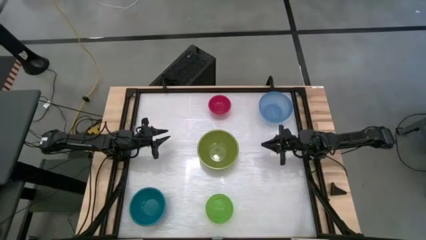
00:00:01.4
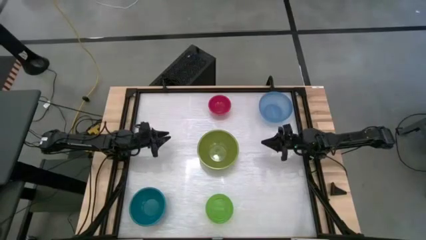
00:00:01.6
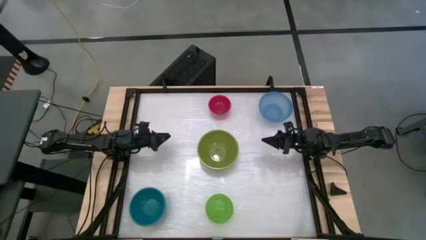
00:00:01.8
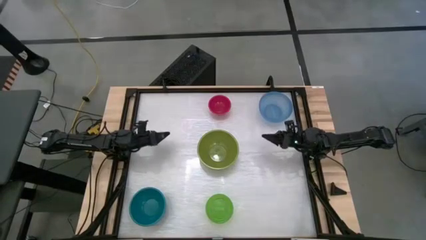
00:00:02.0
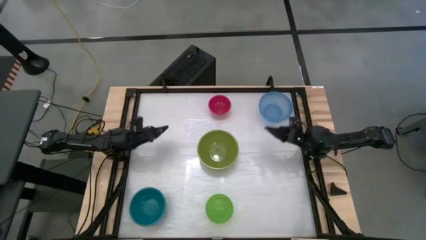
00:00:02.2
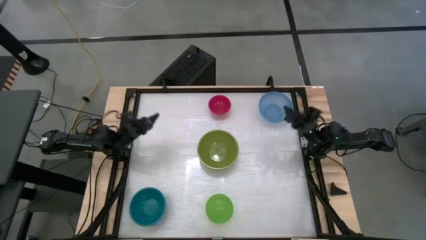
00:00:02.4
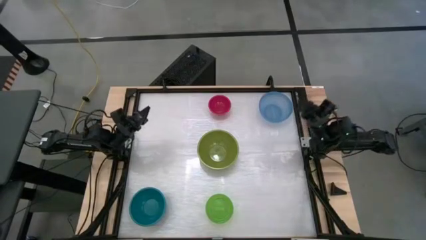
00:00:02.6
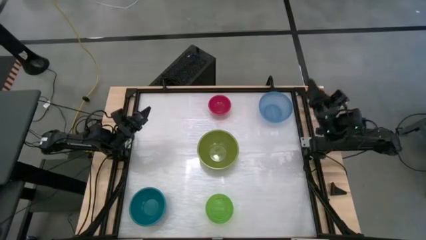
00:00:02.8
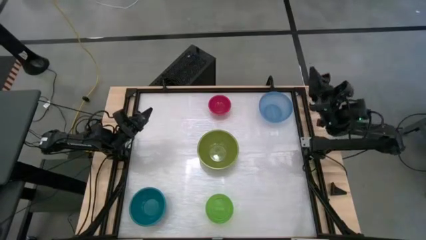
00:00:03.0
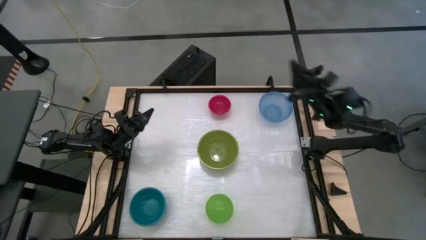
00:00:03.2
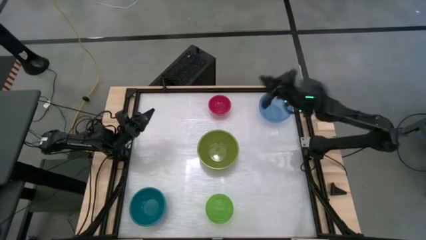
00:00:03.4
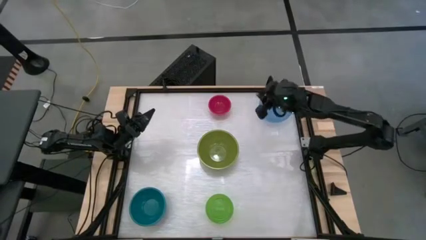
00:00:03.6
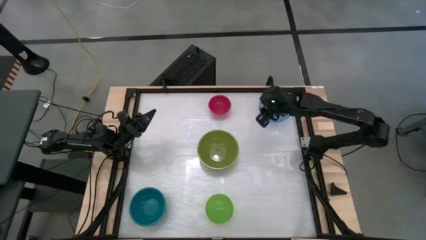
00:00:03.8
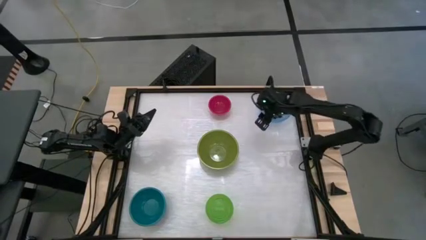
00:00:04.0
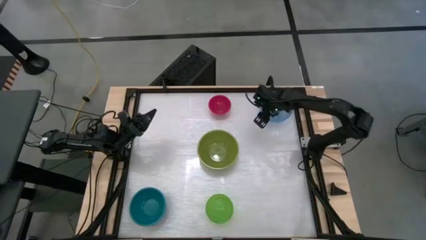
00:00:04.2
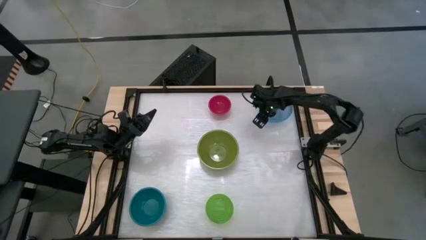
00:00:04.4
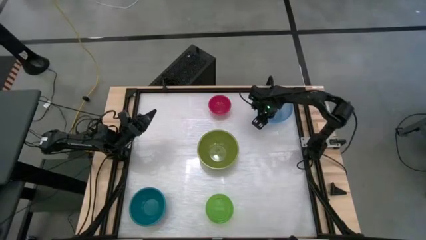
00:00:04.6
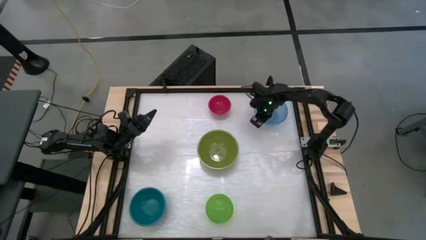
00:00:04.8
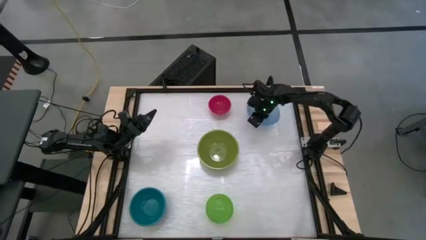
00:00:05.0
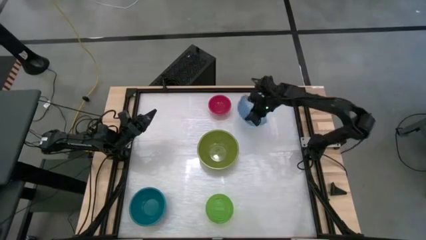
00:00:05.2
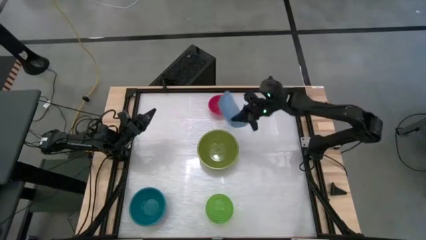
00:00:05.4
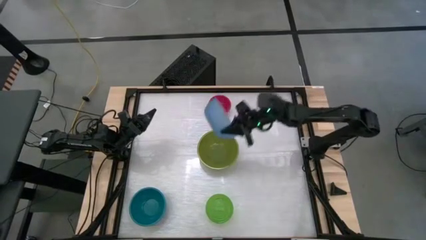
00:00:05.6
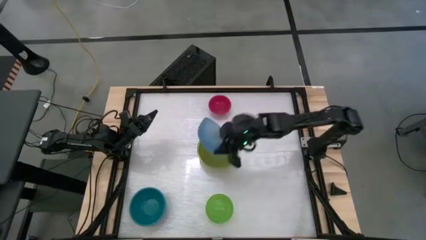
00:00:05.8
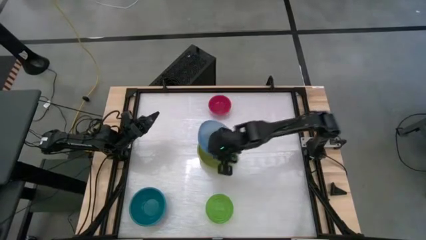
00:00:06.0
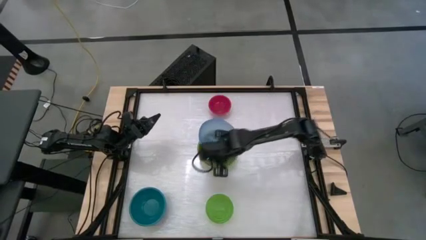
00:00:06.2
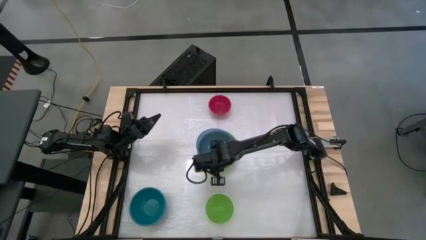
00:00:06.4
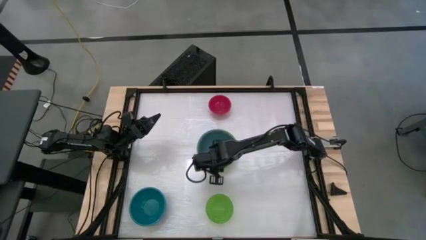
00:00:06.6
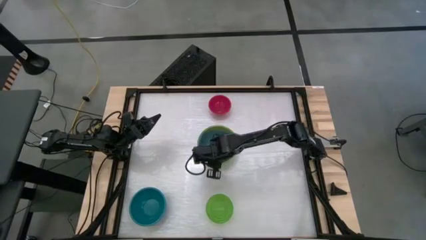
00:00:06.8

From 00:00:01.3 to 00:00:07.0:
Stack the light blue bowl on top of the green bowl

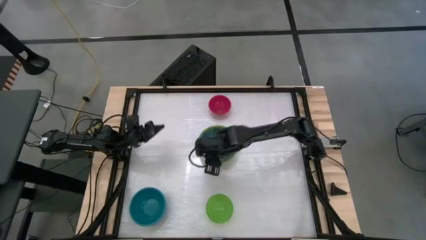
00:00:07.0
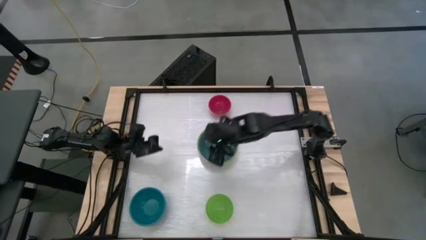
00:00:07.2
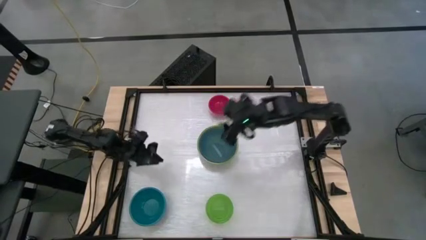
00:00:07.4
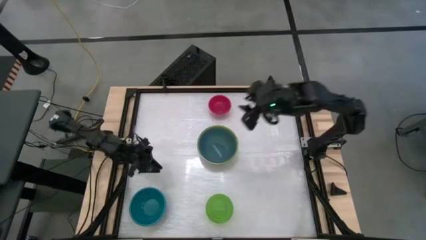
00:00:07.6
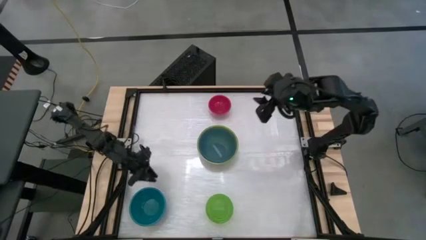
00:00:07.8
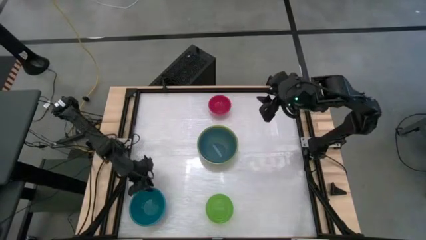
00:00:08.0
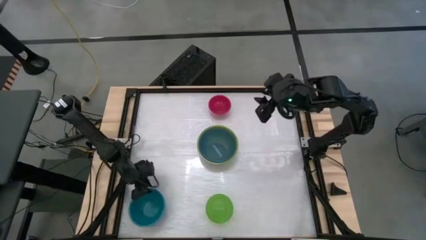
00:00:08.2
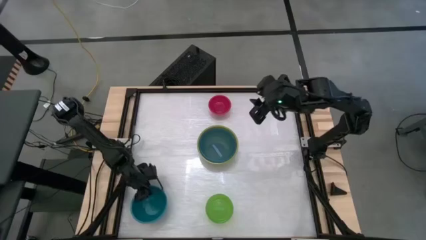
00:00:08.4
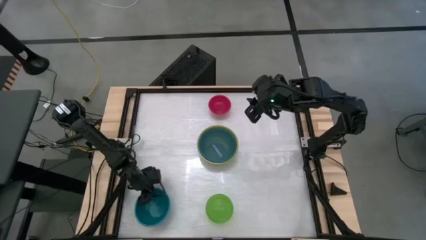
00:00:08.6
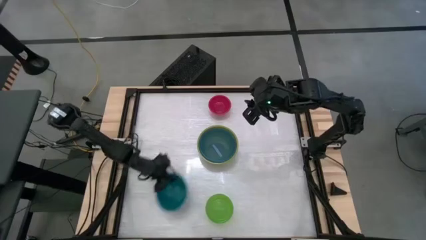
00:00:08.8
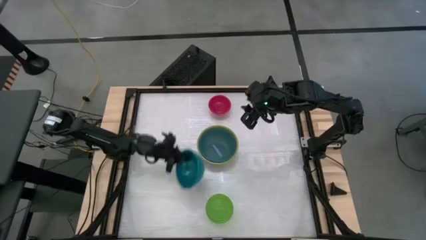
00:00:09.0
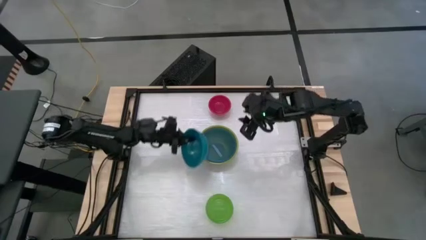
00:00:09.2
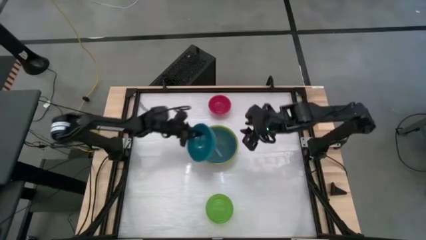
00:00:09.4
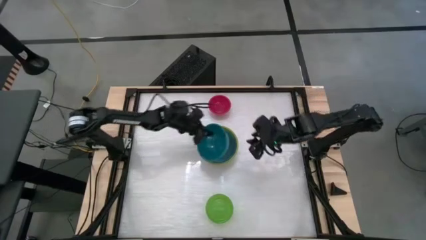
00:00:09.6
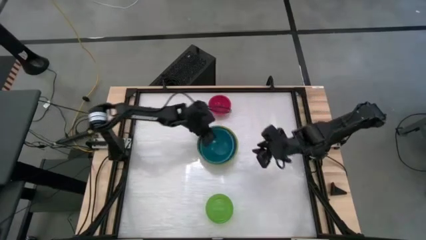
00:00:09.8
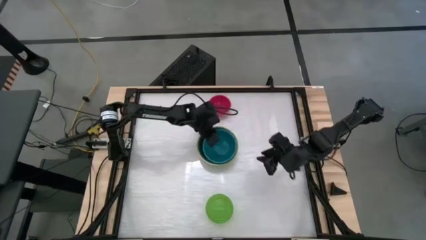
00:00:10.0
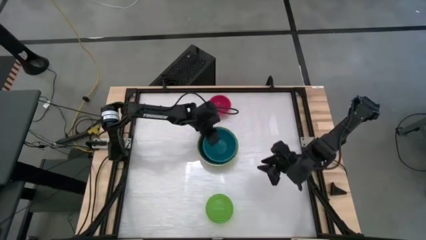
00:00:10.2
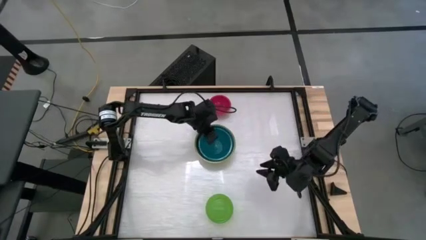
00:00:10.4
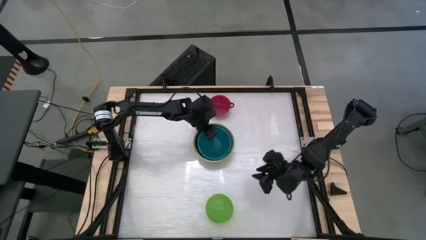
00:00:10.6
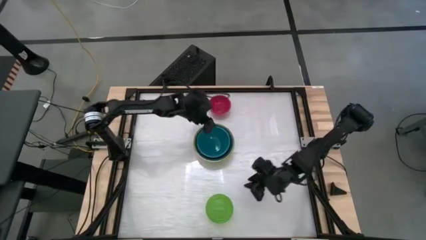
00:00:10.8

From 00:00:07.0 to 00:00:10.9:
Stack the blue bowl on top of the light blue bowl

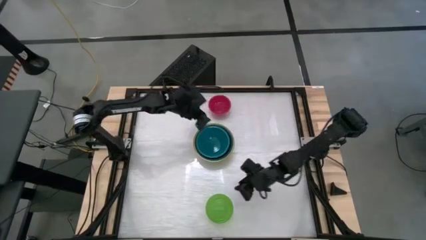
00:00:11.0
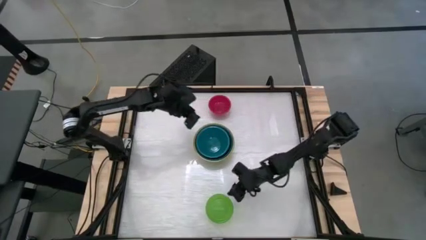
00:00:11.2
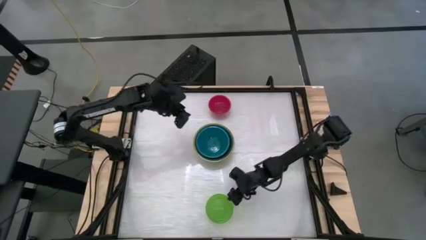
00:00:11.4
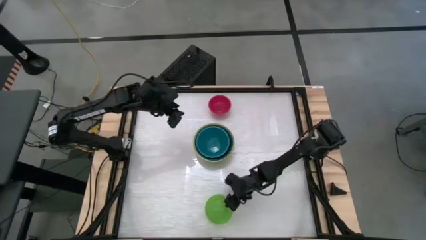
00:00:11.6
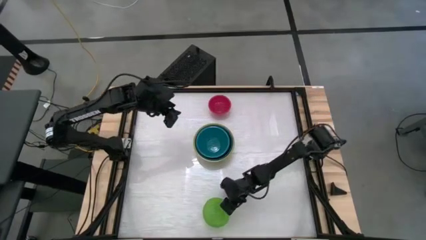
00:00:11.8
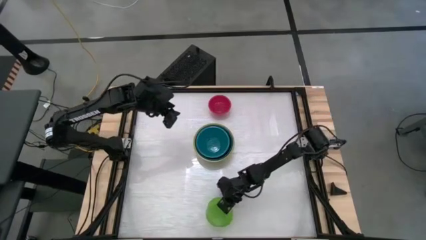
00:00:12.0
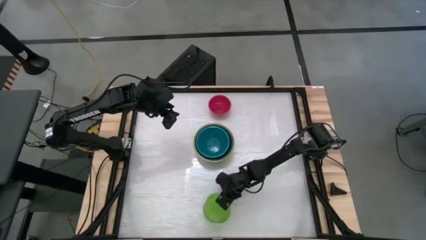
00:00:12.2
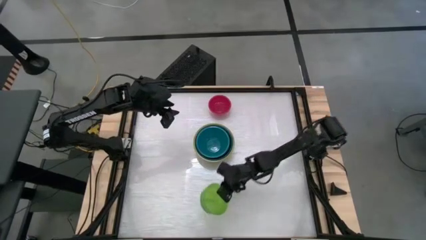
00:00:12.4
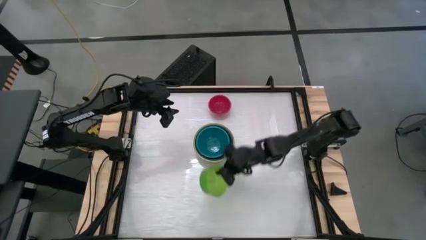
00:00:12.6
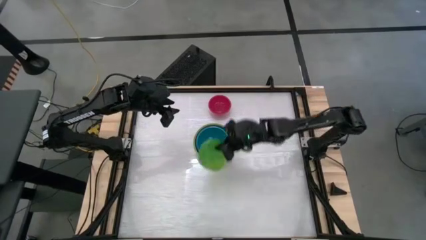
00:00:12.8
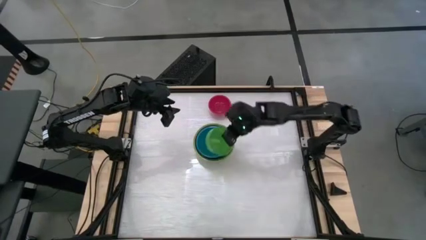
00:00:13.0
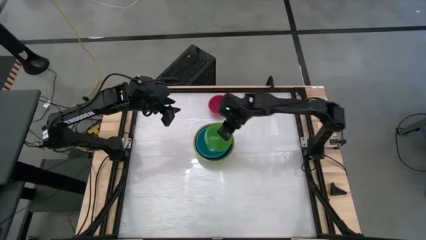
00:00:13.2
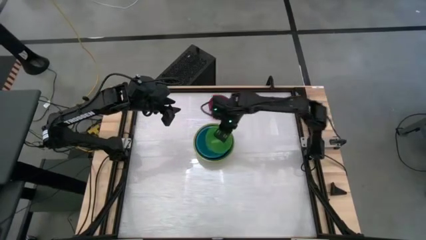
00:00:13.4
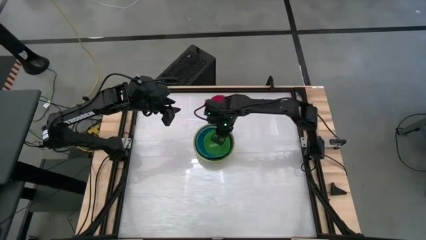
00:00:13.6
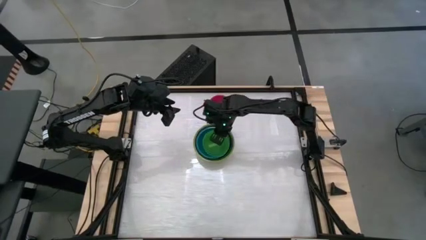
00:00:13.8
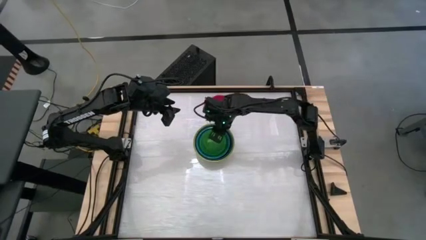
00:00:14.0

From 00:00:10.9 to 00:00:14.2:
Stack the green bowl on top of the blue bowl

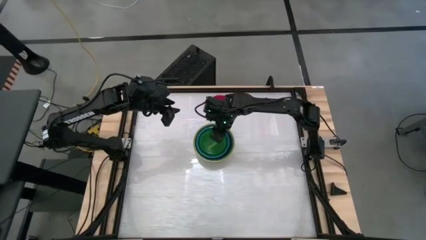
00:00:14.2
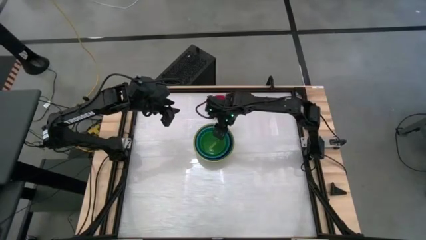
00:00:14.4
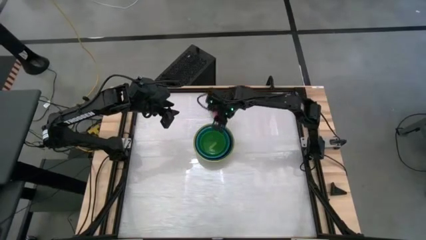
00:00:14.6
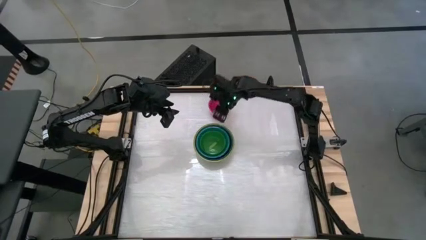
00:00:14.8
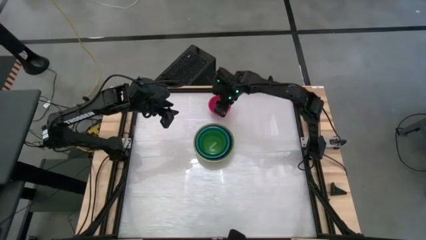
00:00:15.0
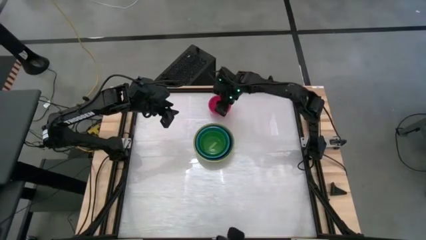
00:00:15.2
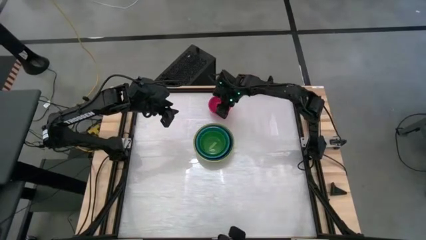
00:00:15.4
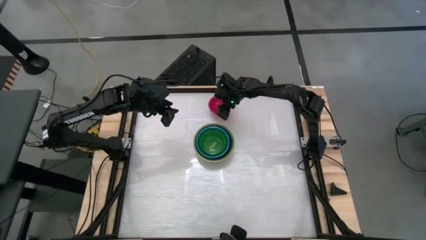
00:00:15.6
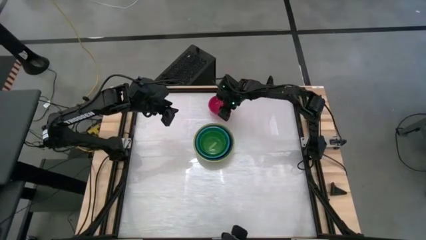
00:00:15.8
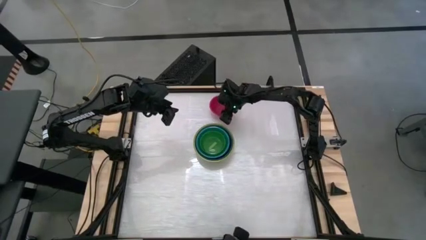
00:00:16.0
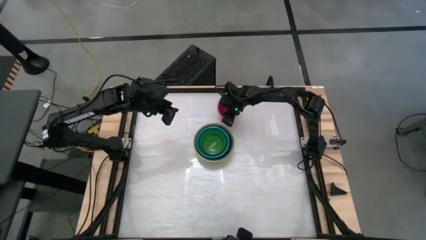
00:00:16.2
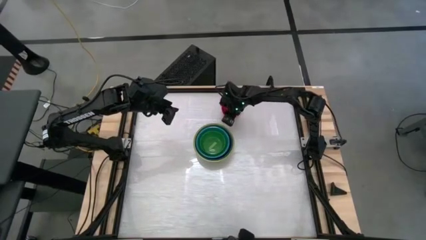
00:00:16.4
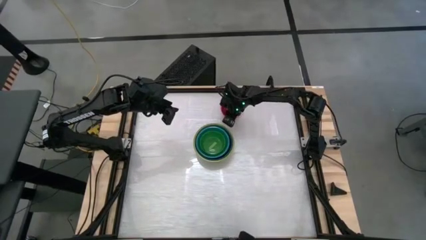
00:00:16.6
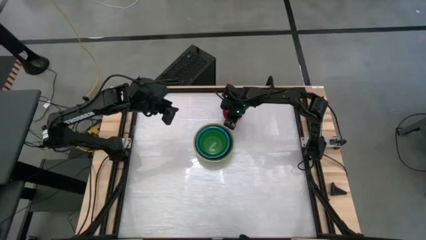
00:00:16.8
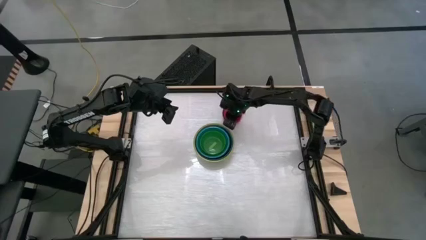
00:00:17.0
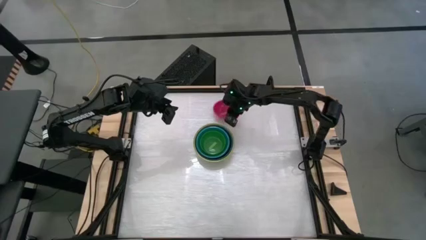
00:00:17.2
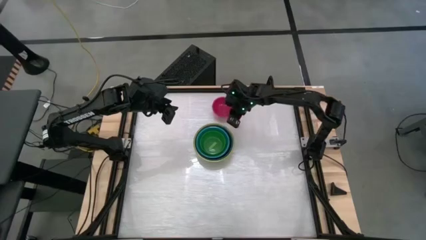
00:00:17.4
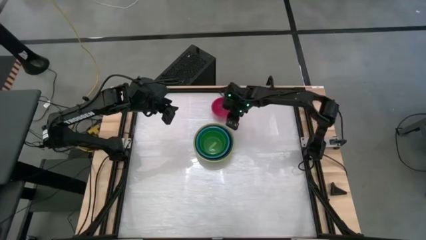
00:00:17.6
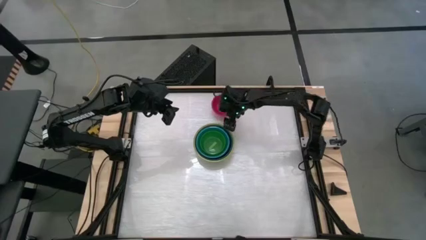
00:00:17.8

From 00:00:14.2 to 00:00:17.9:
Stack the red bowl on top of the green bowl
